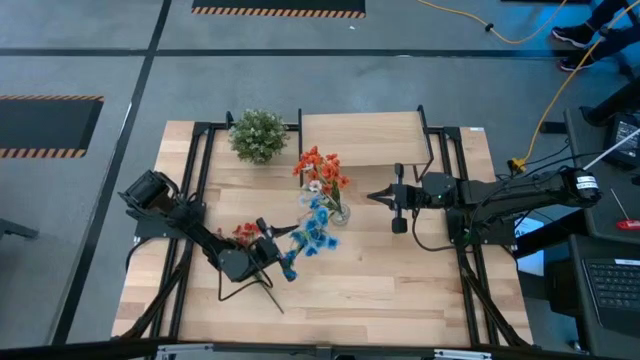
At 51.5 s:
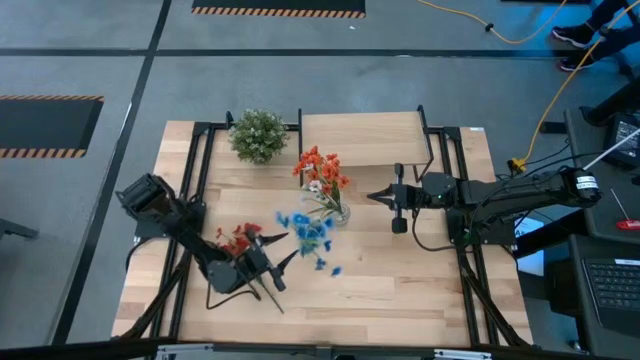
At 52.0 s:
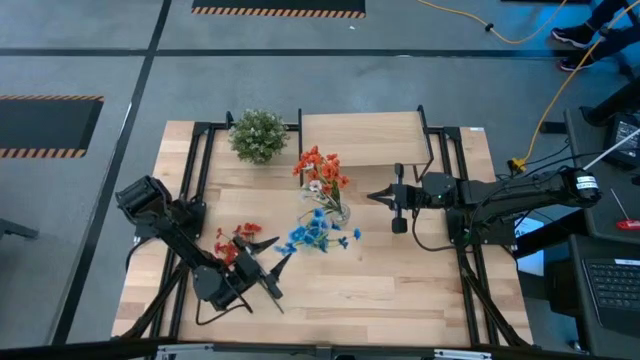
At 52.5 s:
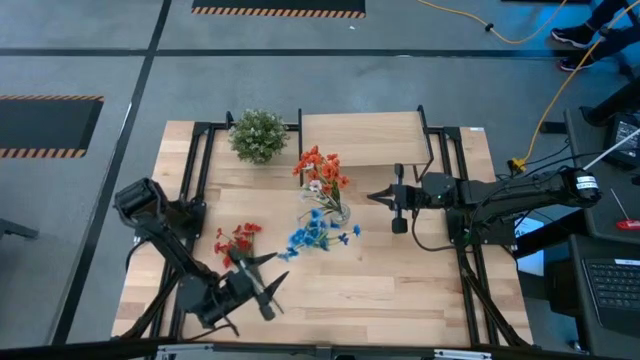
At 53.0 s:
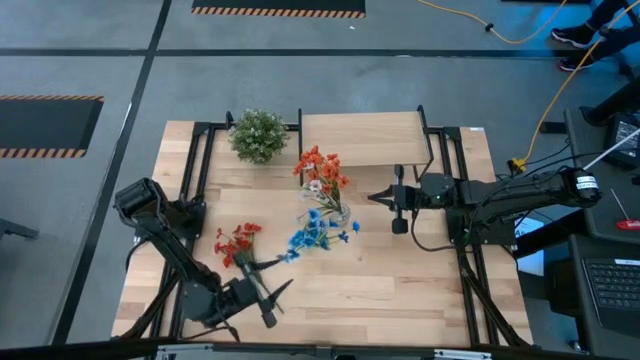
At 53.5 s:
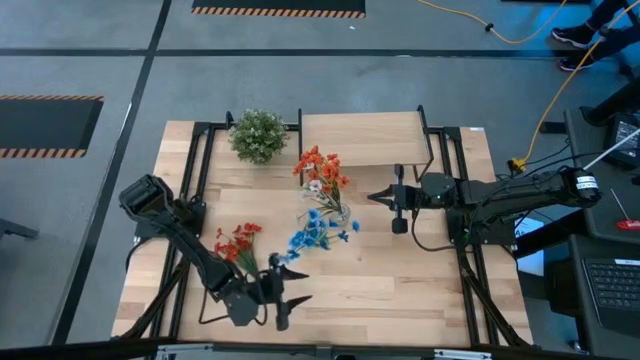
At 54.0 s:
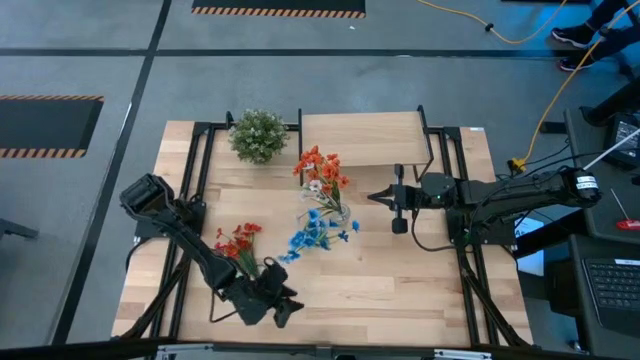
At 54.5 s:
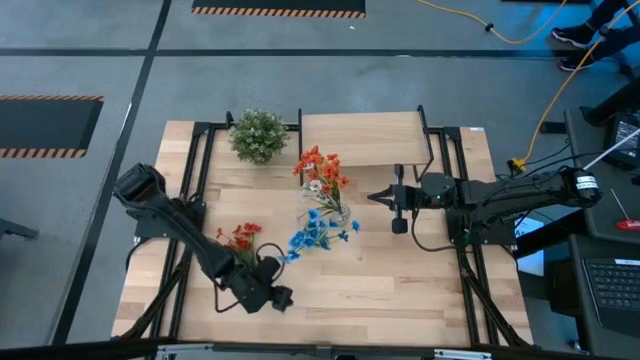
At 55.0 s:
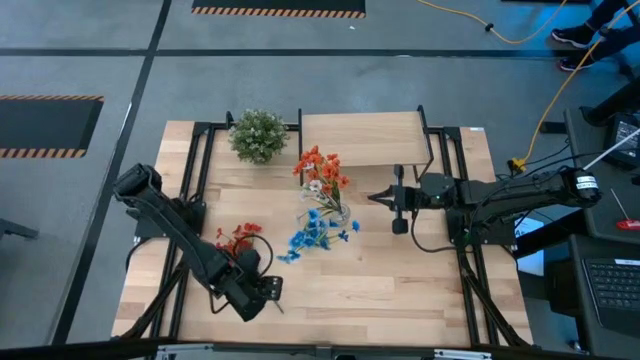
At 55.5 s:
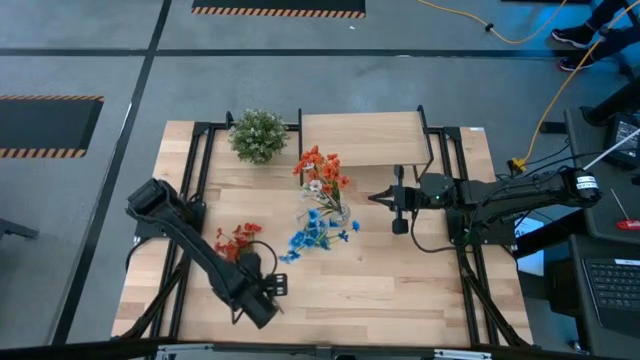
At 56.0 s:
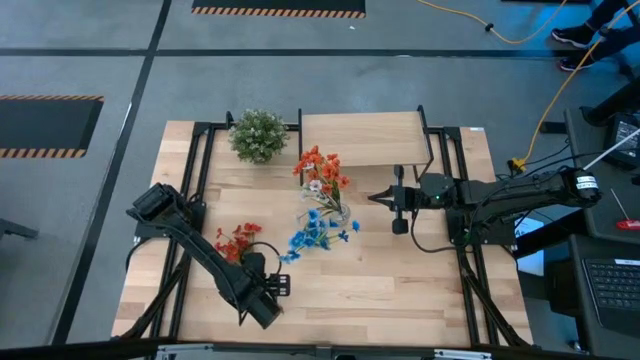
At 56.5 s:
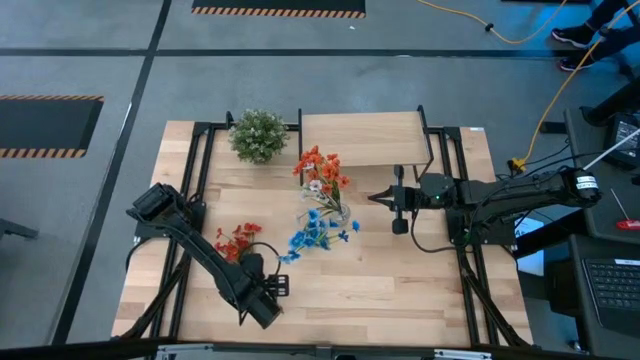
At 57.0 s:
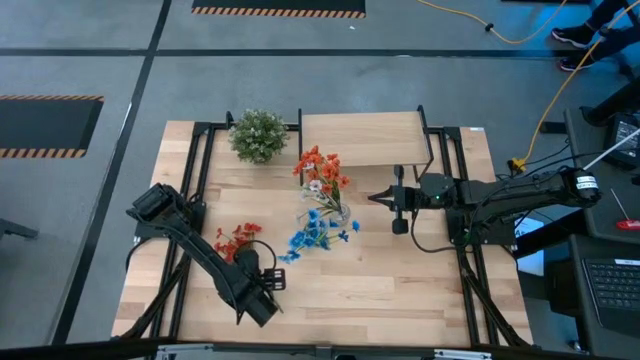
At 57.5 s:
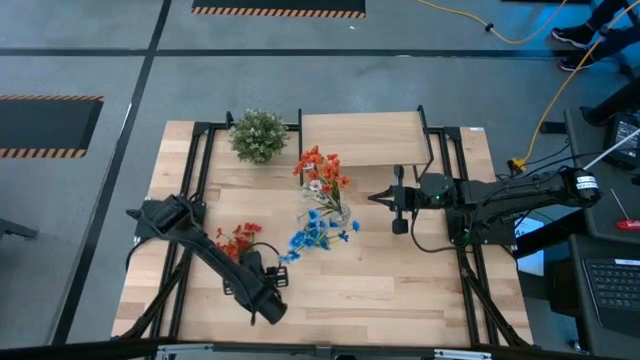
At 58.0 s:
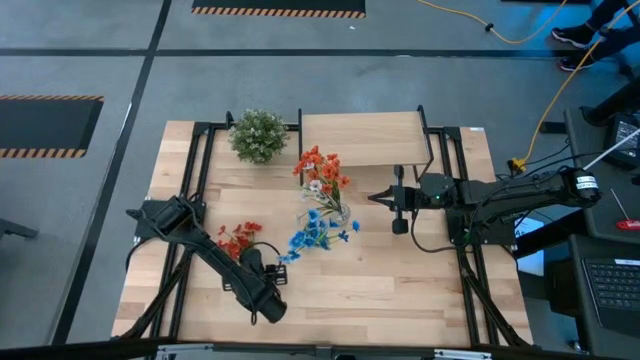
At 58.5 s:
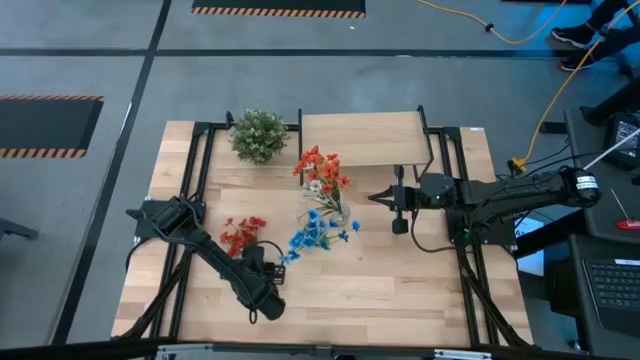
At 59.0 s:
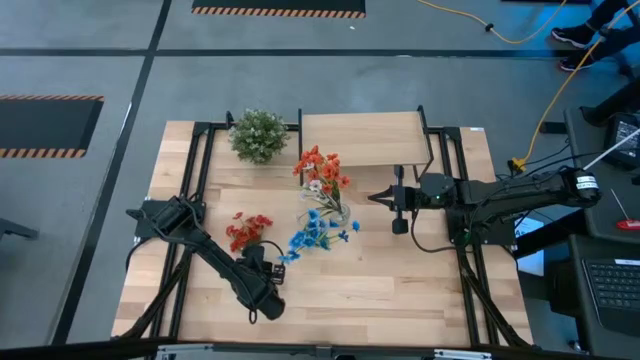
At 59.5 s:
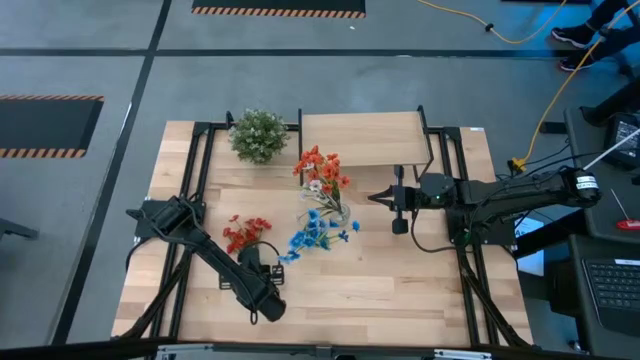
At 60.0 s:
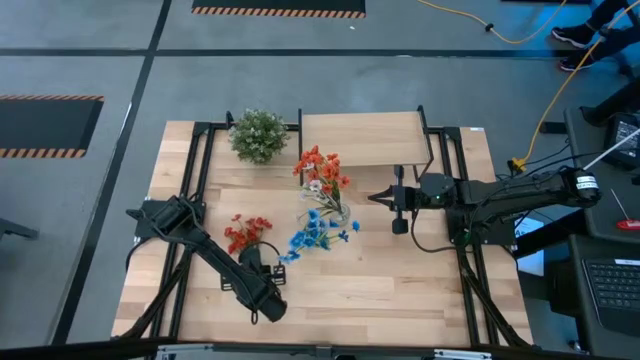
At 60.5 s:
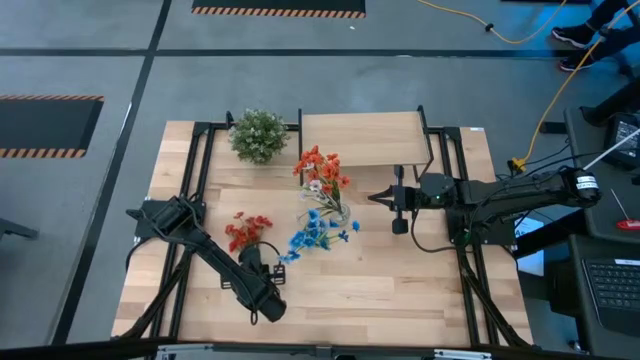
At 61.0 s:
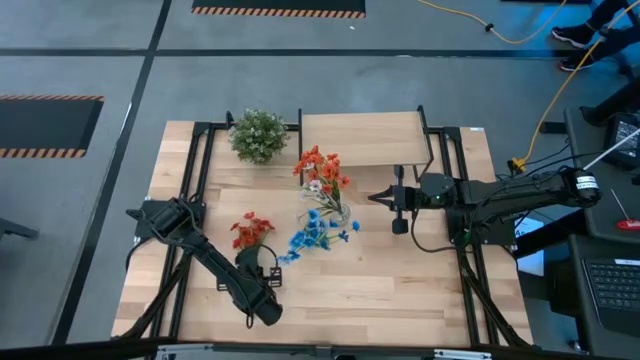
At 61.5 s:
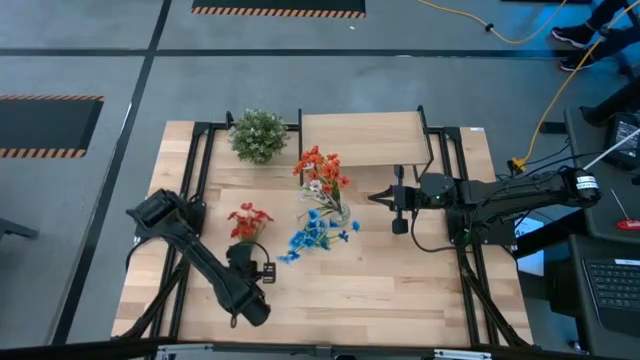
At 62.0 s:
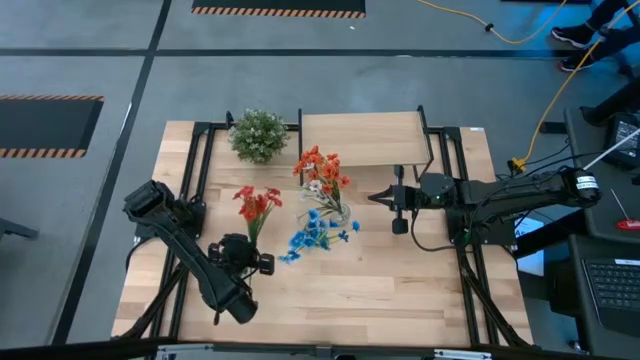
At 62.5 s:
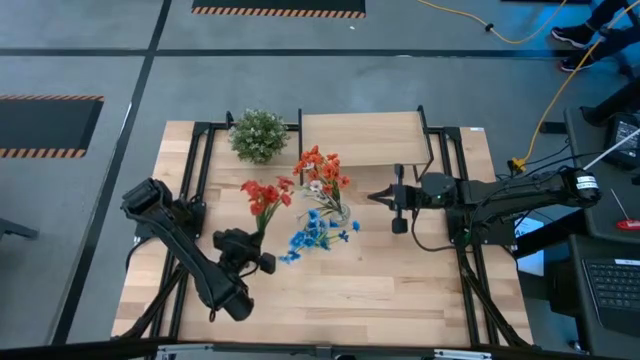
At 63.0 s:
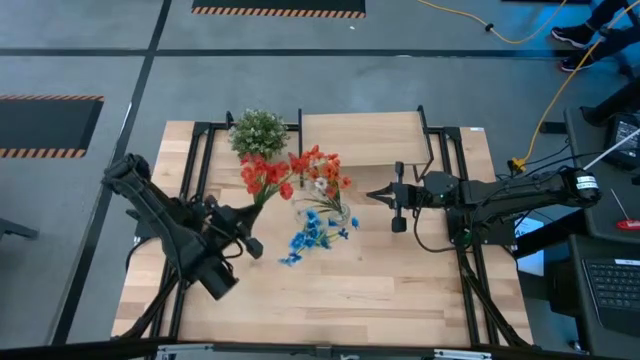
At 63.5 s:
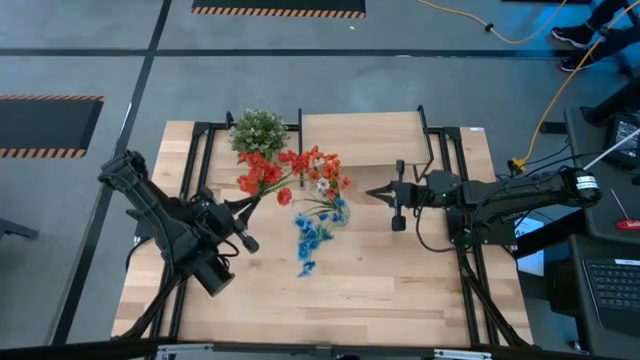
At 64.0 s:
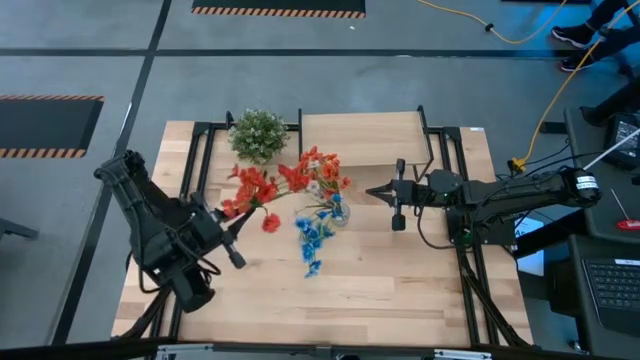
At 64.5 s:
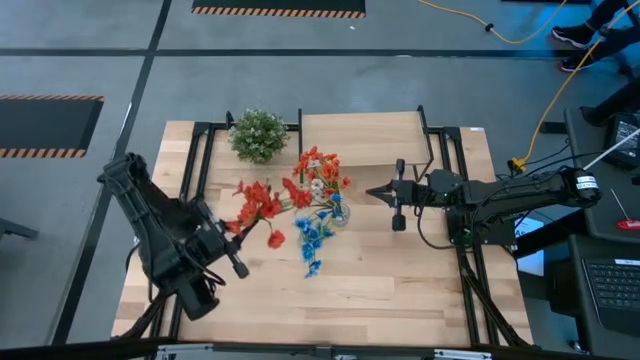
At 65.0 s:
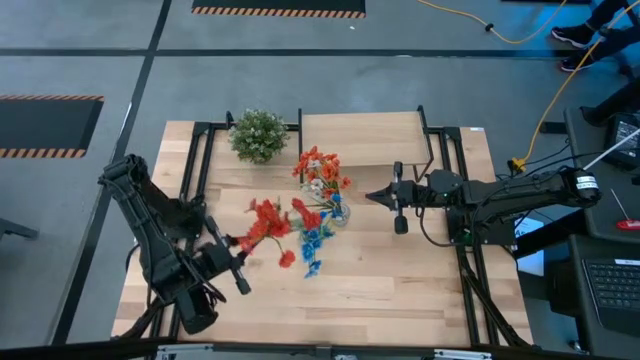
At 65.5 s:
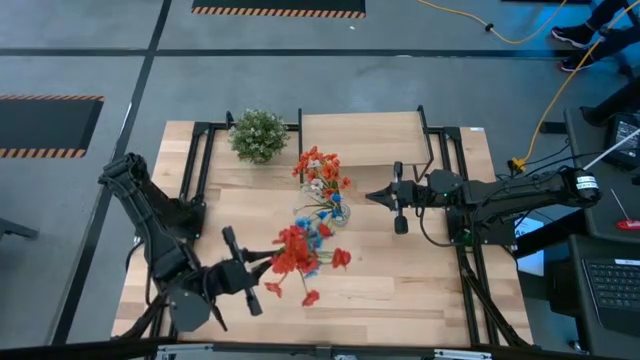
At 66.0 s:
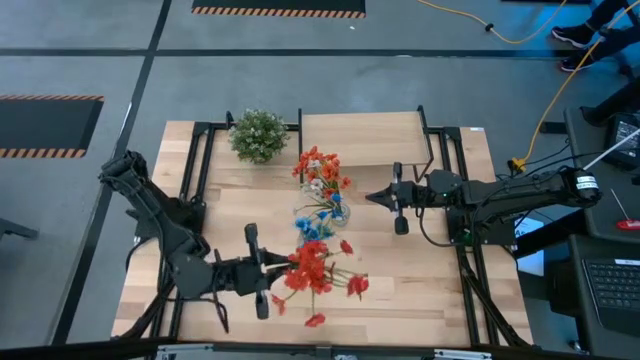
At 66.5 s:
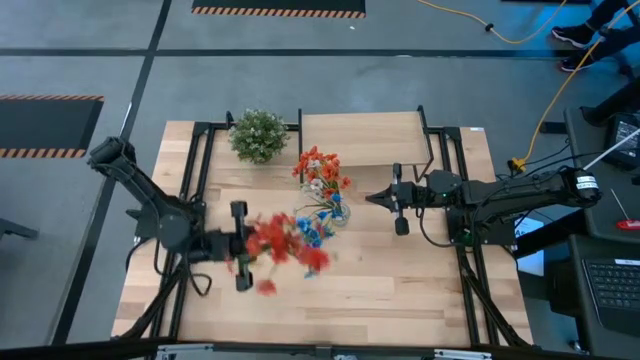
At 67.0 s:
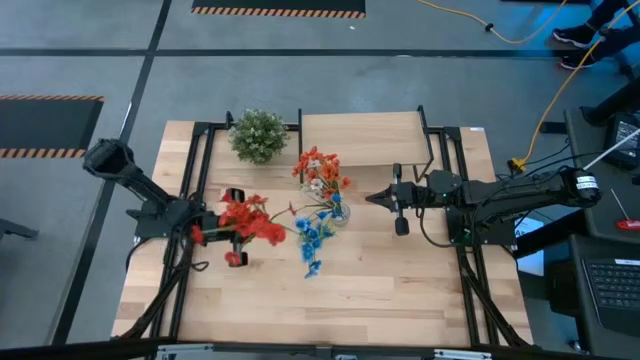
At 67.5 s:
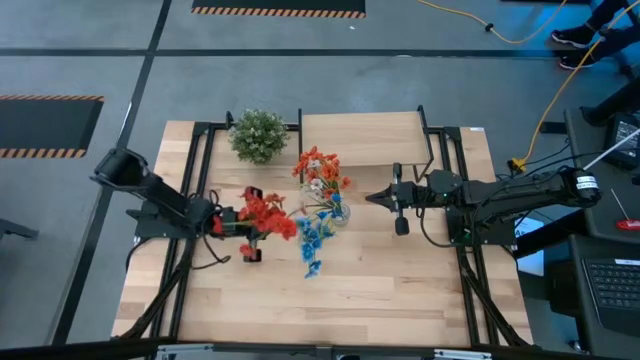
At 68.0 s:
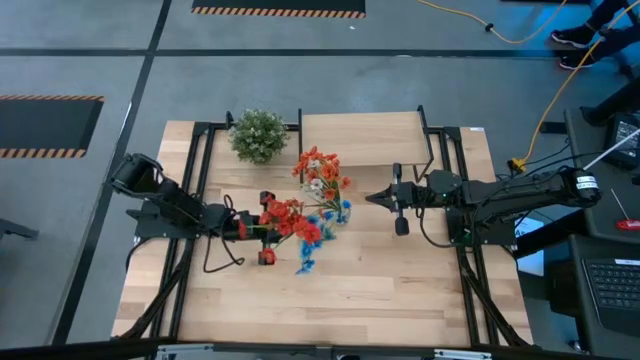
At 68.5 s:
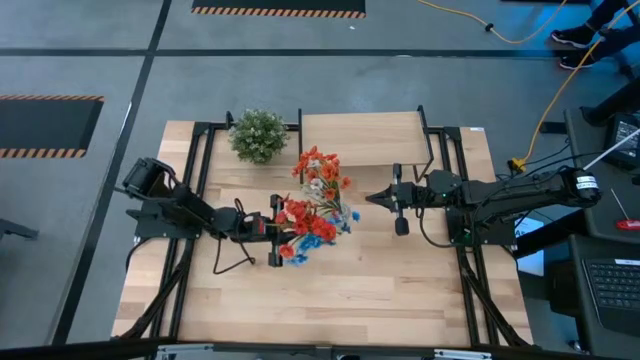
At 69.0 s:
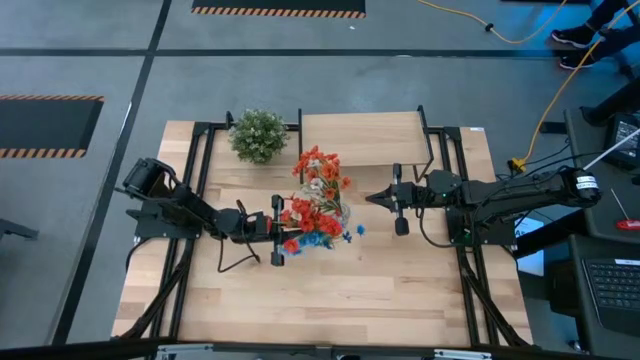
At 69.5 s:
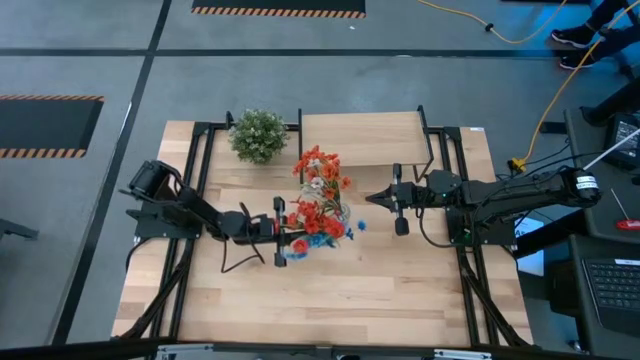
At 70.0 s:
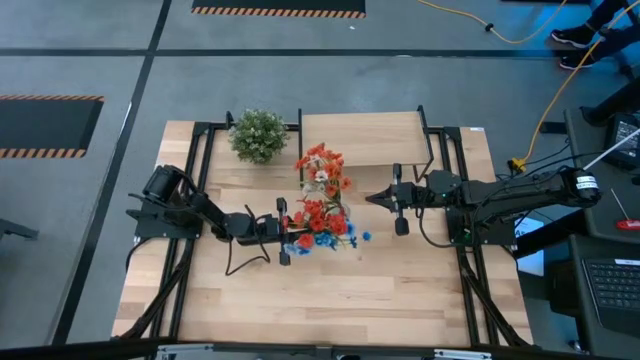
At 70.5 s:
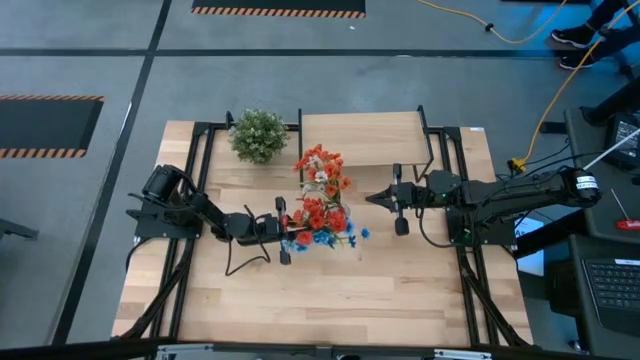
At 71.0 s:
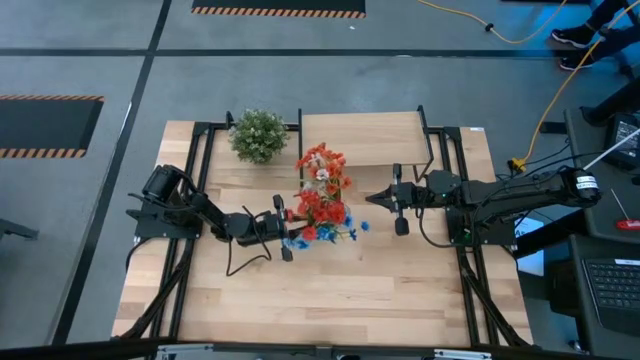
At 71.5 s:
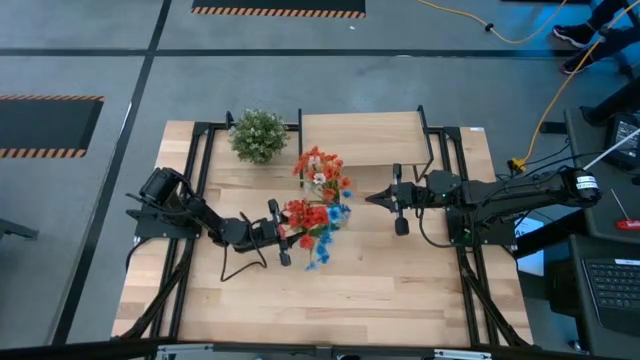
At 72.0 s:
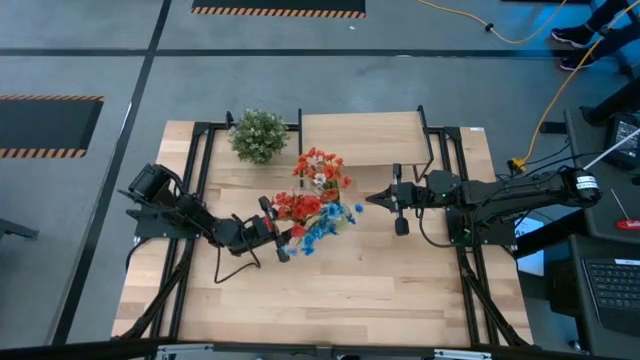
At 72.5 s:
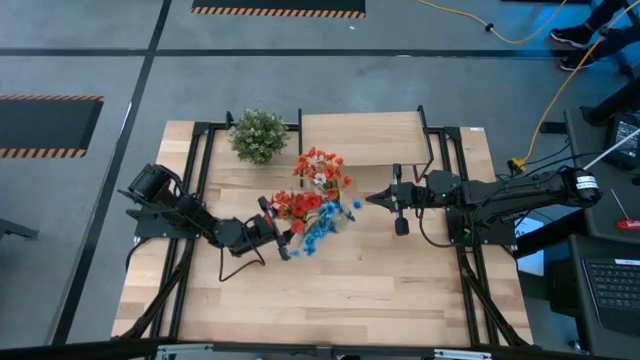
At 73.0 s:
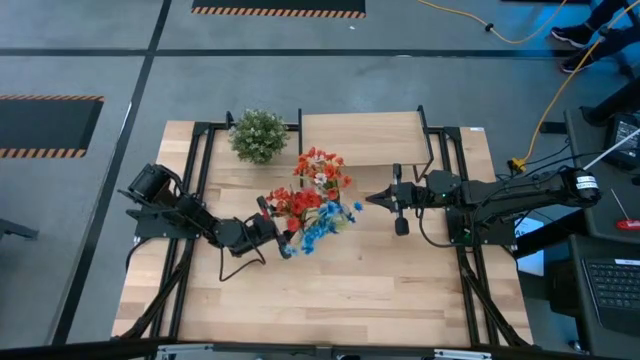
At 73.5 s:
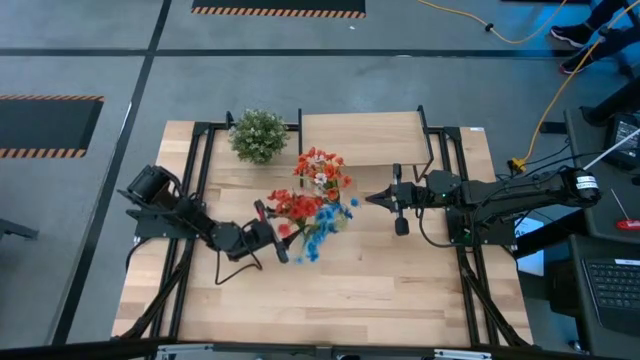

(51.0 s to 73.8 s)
Task: Pick and place flowers into a vace then onto a shelf
Put the orange flowers into the bottom transparent vase
